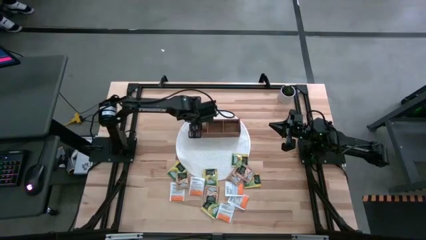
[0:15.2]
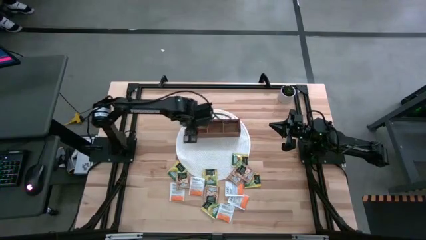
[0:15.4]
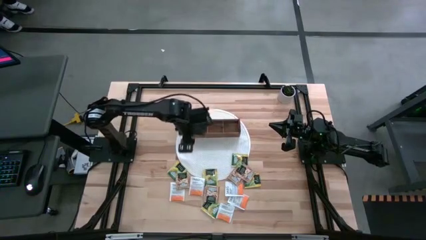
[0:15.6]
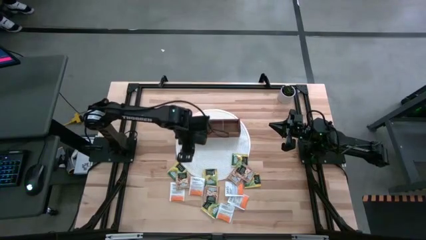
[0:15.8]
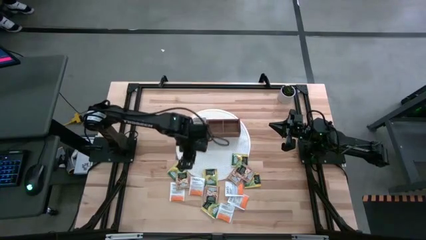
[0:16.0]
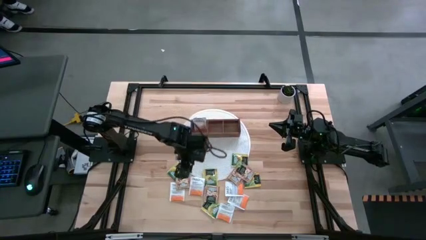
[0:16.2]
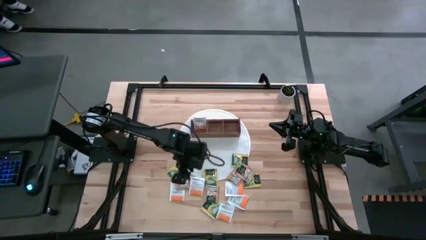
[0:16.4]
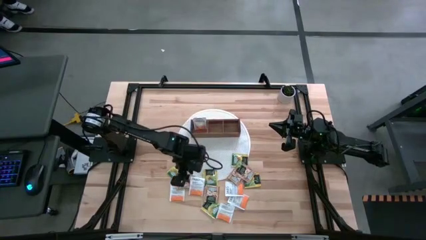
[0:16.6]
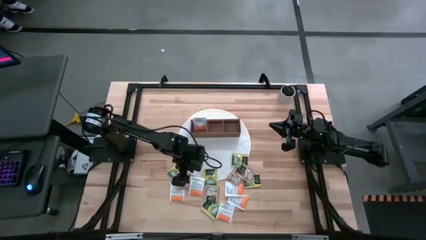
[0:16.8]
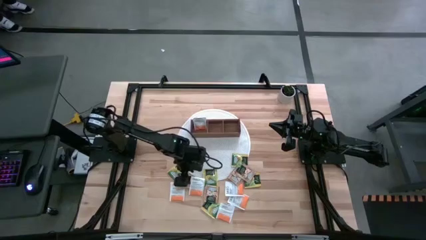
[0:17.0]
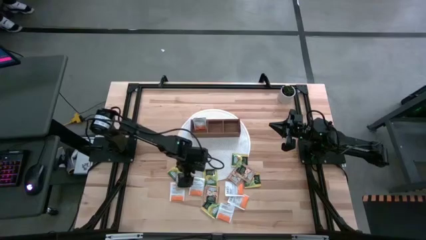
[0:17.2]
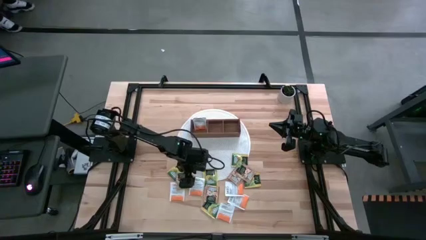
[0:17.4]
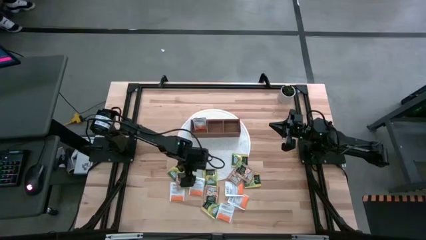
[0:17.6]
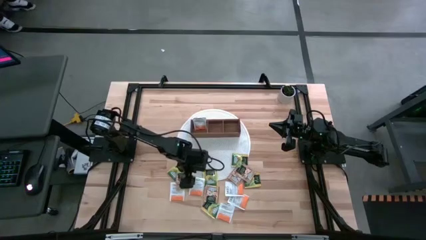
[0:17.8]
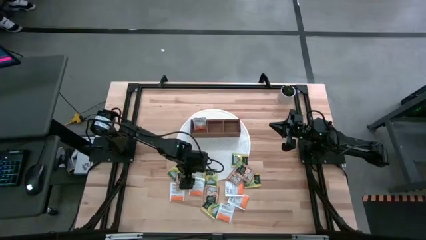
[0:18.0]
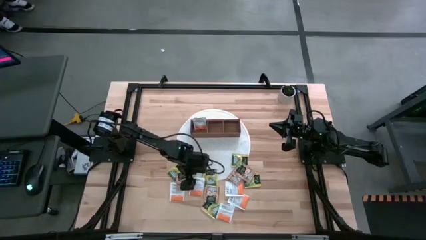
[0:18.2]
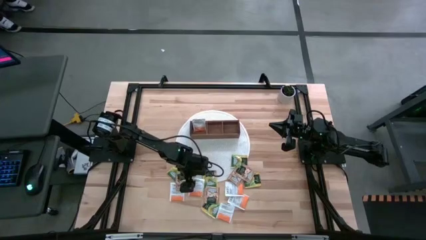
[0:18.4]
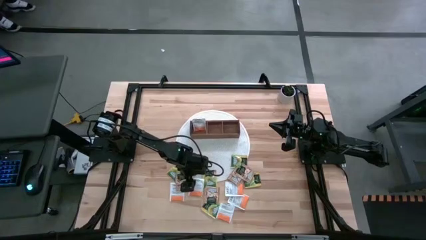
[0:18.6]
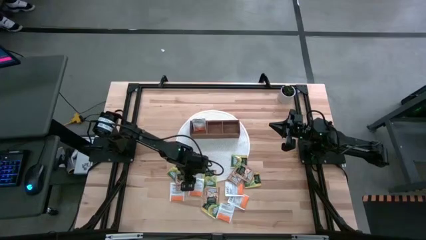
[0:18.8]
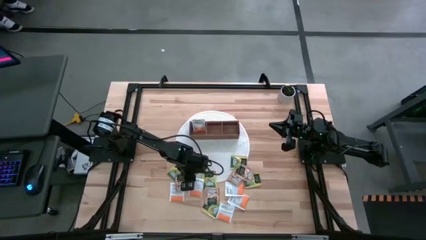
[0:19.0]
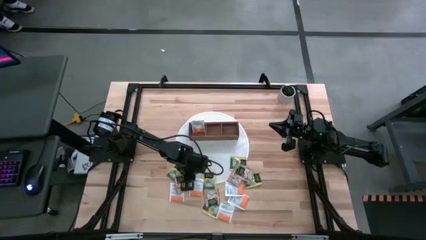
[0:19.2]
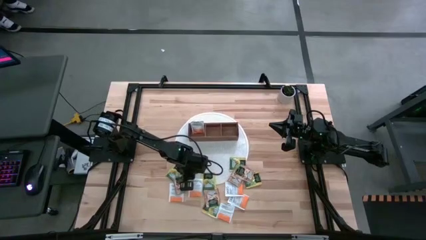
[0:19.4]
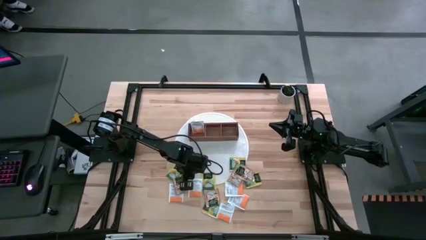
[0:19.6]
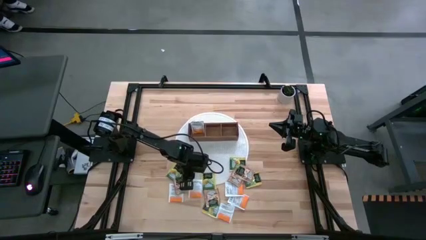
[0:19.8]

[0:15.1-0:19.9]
Task: Pick & Place Tea
Put the orange tea bag into the left section of the wooden organizer

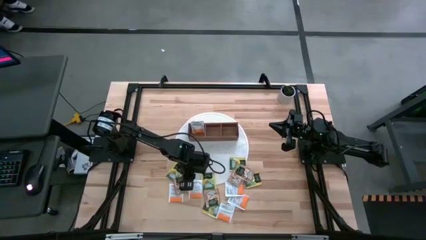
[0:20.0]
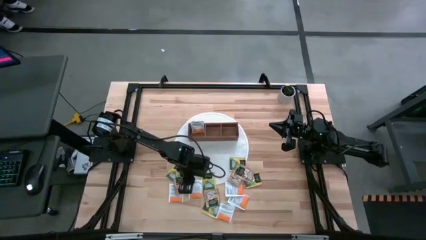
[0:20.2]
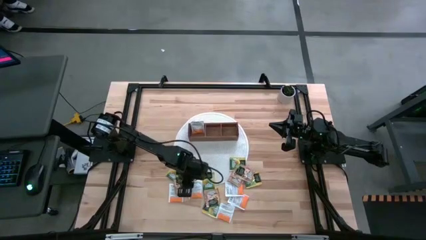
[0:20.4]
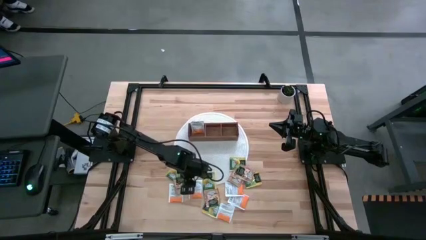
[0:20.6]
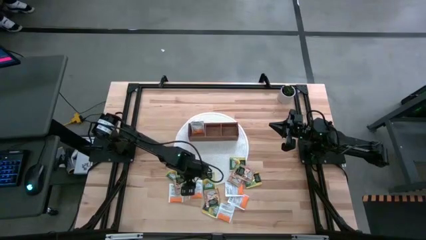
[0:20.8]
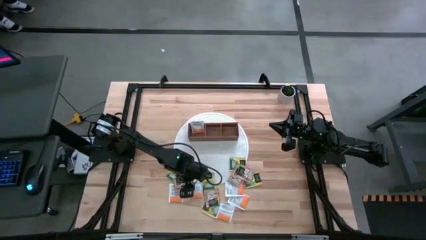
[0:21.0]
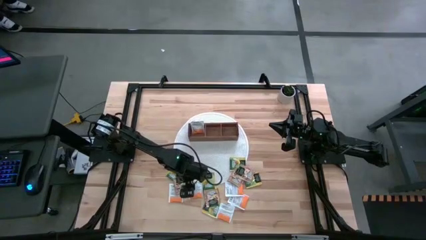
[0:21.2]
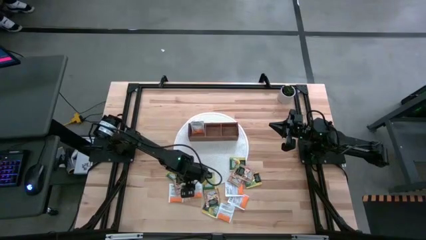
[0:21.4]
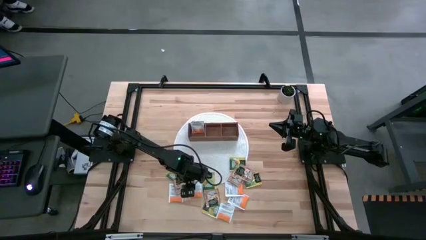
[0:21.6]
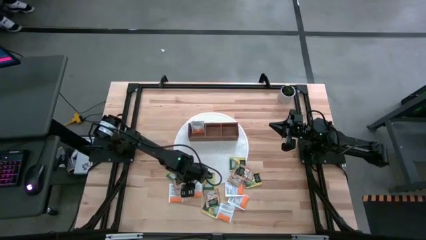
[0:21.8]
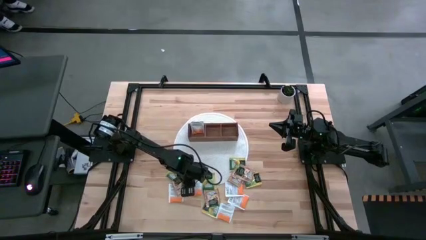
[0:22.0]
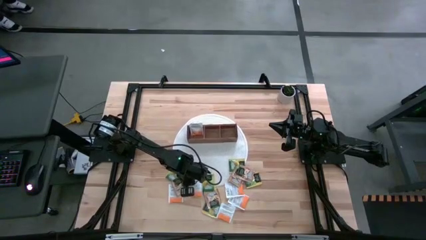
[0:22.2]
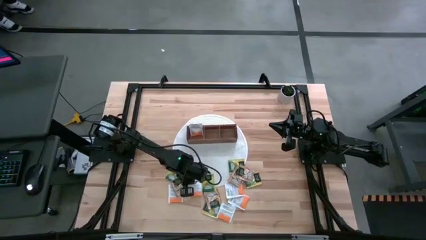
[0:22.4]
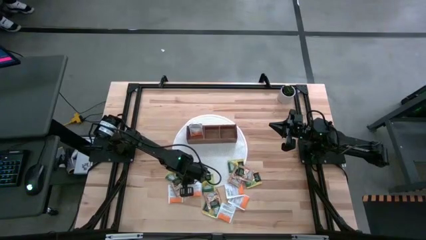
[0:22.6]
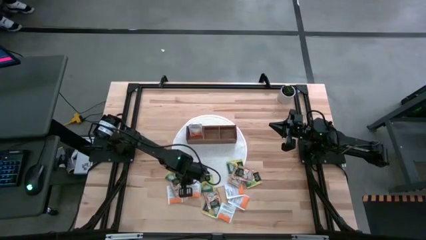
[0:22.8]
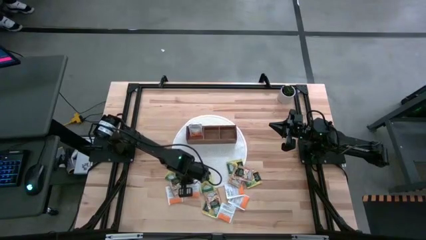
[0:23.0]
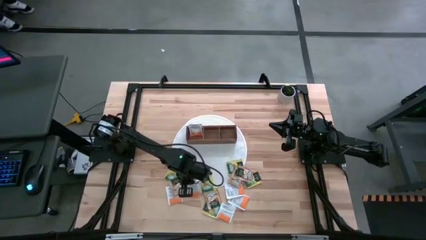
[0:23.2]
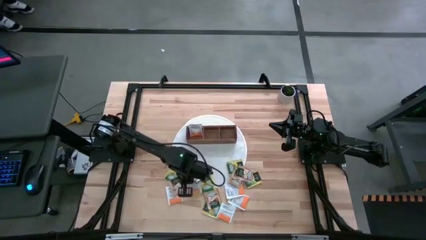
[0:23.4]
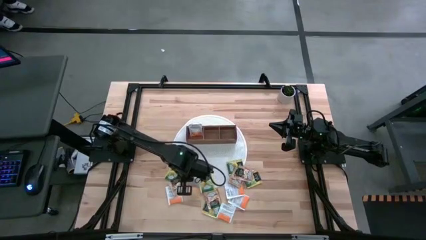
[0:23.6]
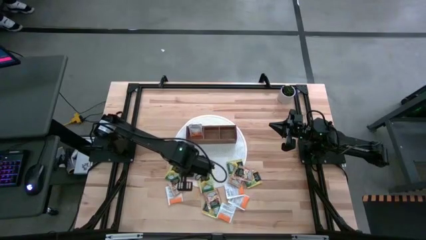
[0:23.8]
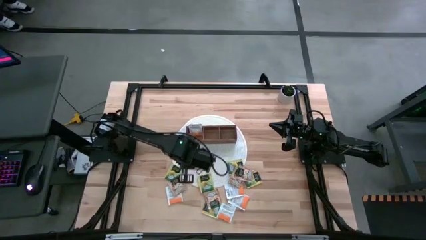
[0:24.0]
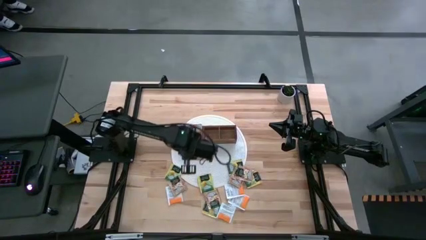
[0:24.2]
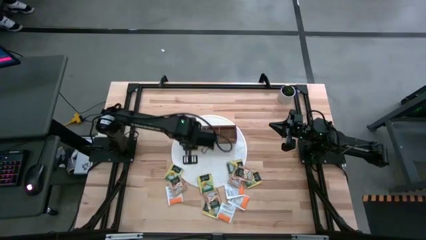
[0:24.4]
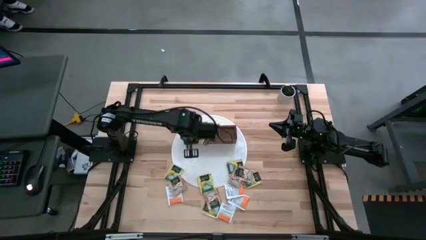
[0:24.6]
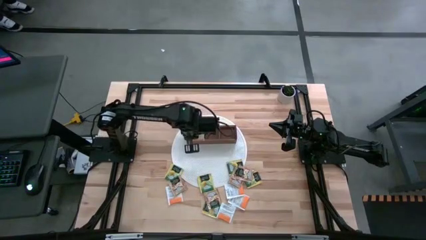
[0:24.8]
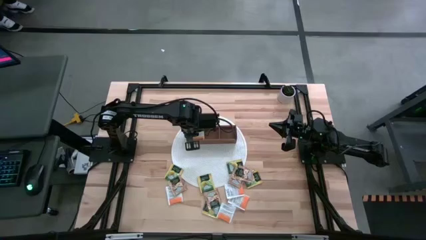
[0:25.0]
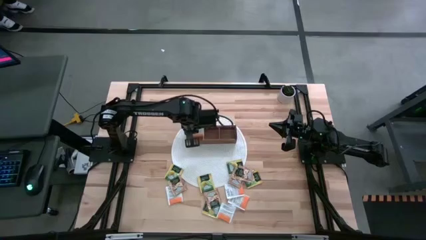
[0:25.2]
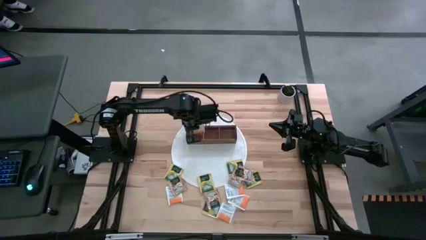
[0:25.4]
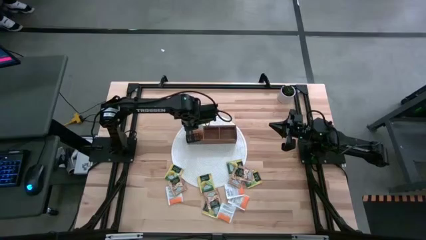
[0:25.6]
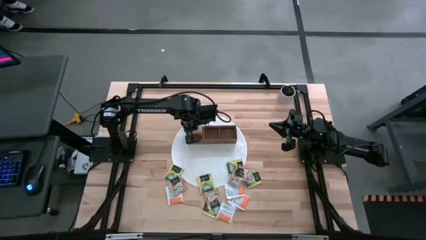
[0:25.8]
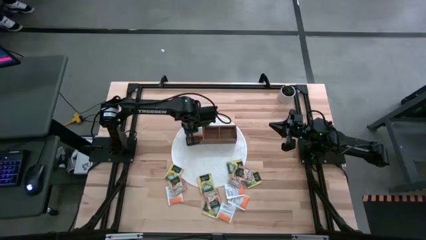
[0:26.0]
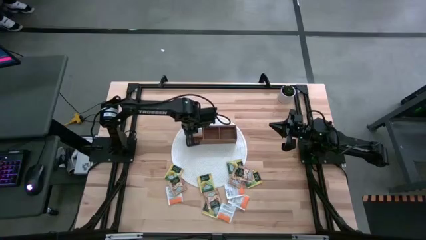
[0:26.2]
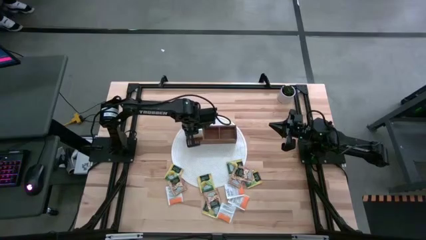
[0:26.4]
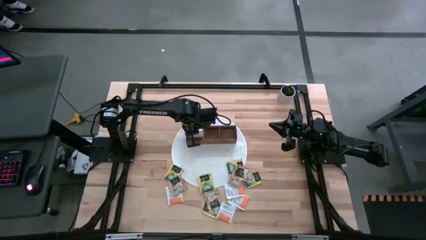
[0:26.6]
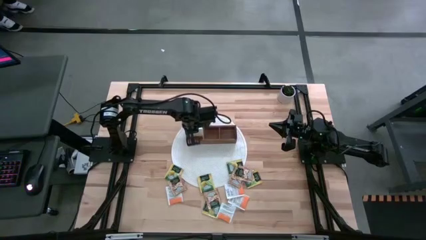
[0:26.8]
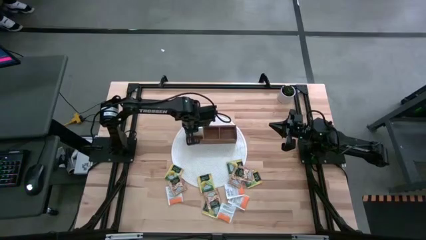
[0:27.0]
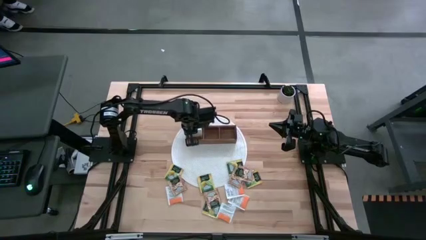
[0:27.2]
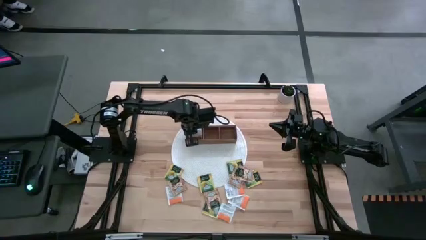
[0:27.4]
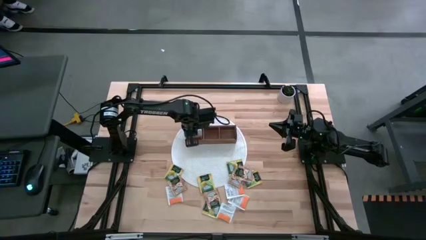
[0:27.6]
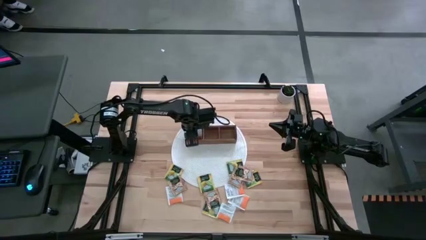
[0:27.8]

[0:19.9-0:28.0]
Put the orange tea bag into the left section of the wooden organizer

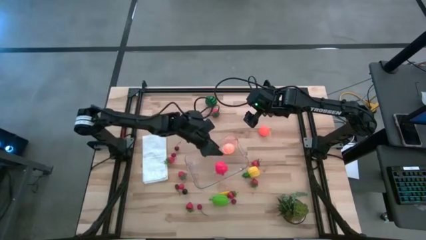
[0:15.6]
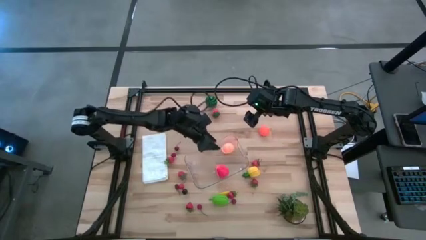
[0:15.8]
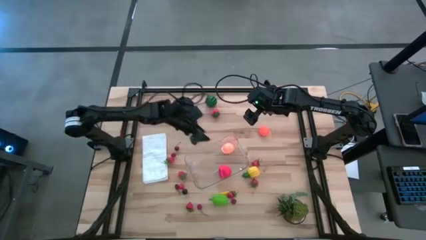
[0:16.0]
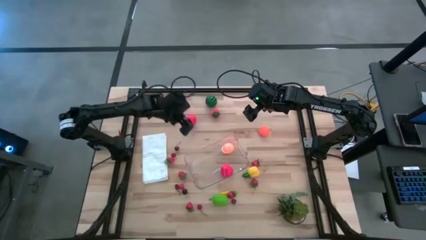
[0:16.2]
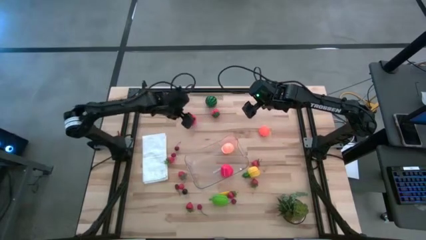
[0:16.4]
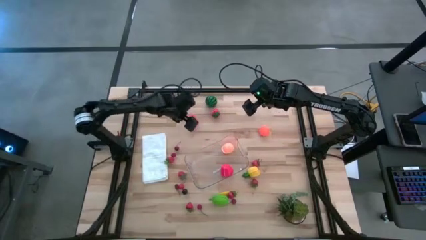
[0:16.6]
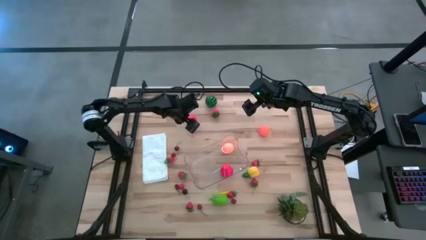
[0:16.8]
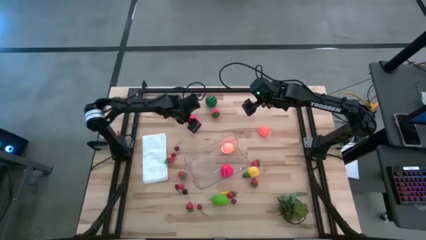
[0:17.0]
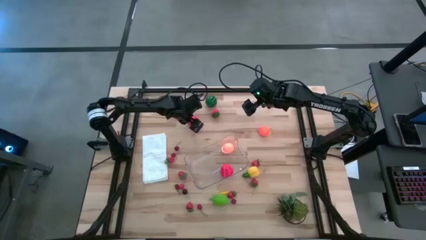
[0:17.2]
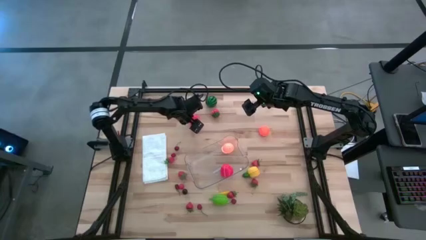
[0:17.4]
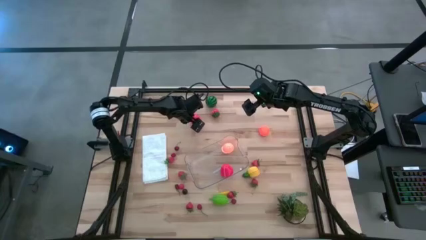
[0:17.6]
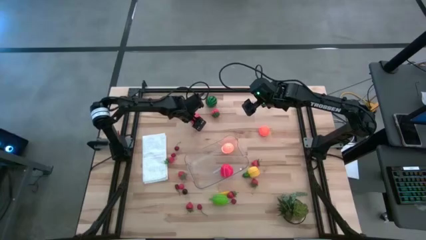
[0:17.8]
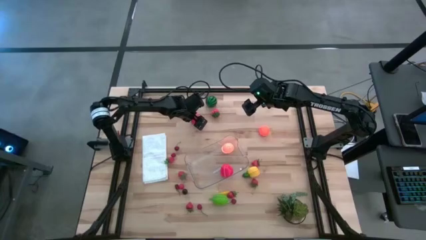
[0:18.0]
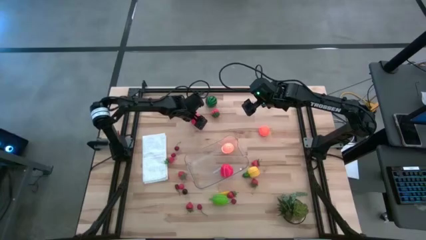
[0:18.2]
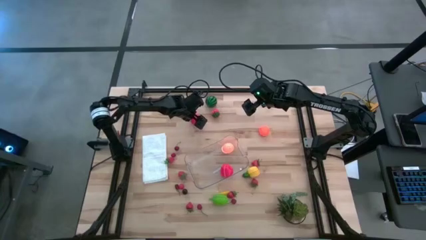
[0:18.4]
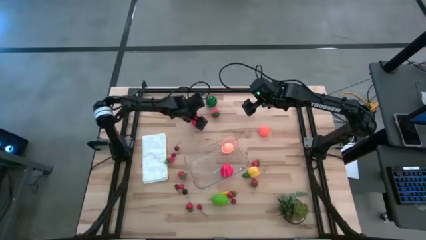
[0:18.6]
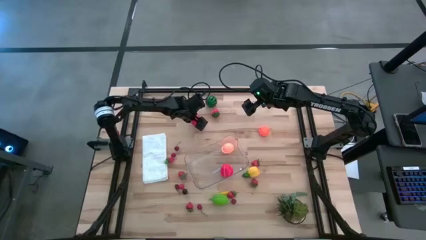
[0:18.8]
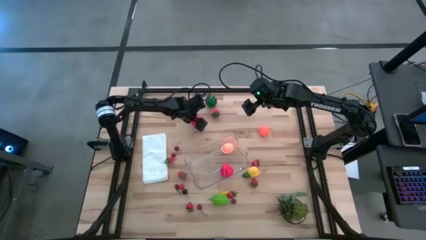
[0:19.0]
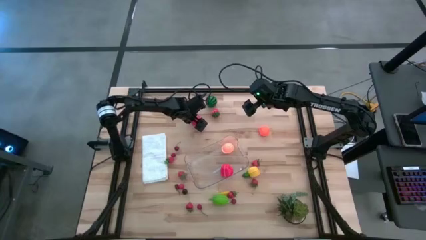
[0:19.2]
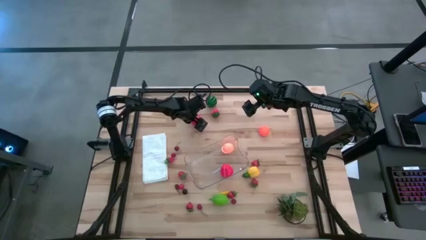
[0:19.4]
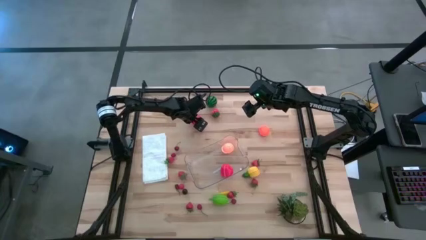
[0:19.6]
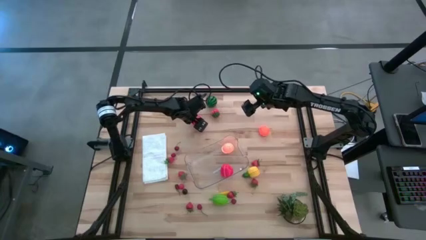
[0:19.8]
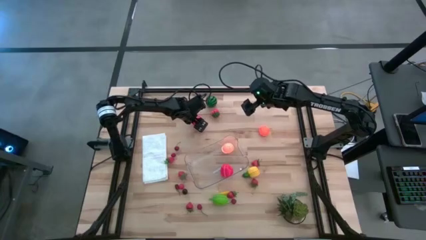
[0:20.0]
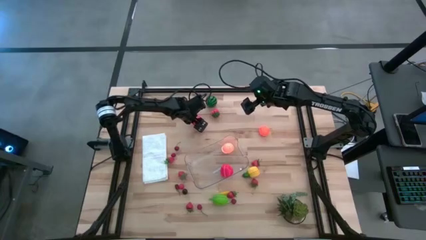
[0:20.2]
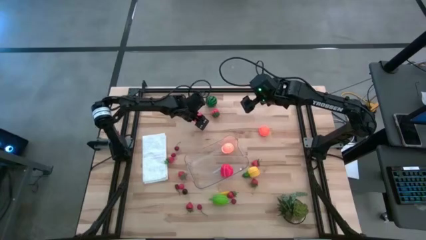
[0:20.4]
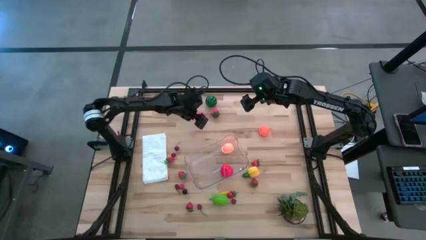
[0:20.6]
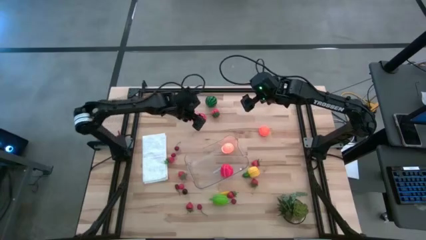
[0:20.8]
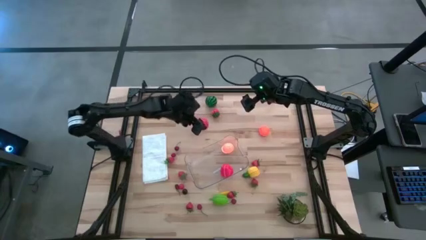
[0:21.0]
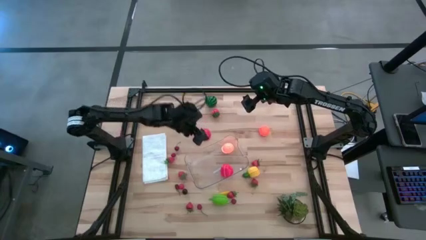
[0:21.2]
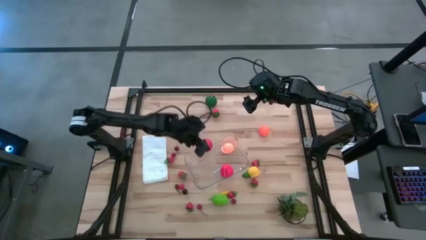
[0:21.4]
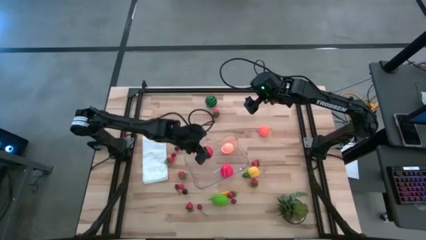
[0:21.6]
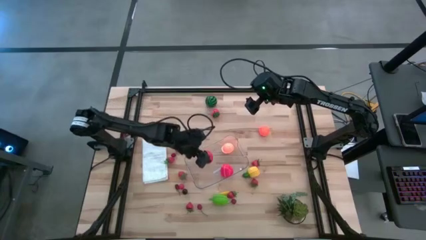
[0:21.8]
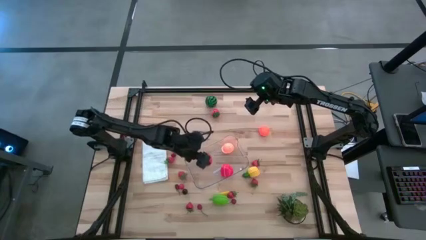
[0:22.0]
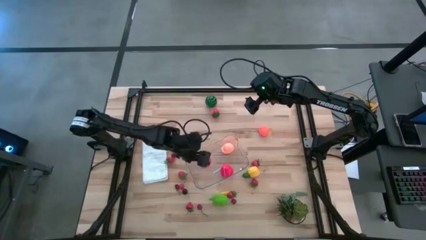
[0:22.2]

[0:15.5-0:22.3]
Task: Pick and placing Produce into tupperware
Put the apple into the transparent bin
